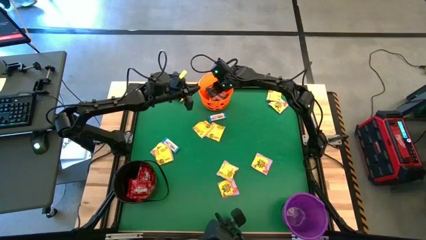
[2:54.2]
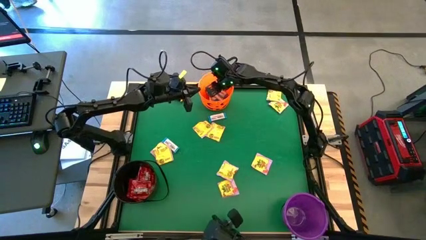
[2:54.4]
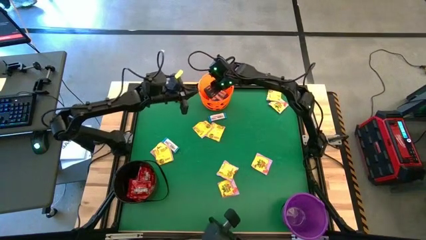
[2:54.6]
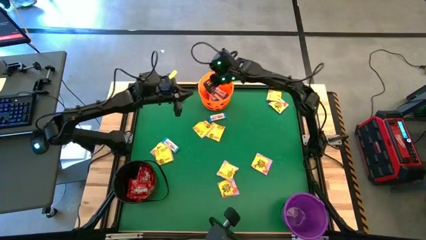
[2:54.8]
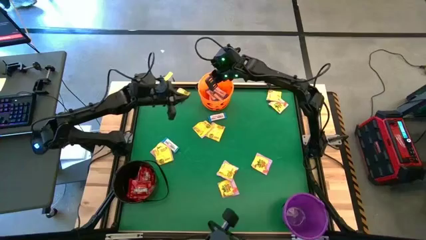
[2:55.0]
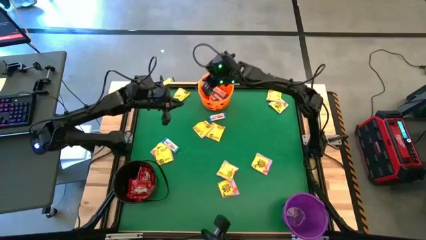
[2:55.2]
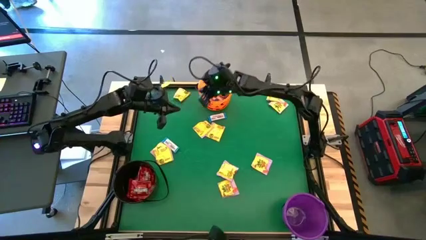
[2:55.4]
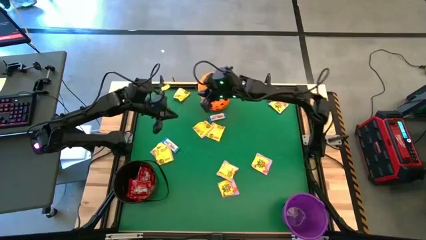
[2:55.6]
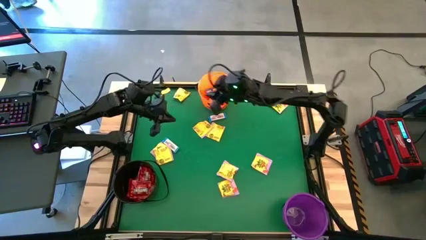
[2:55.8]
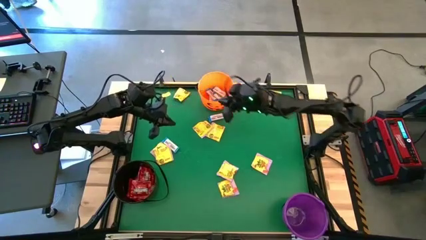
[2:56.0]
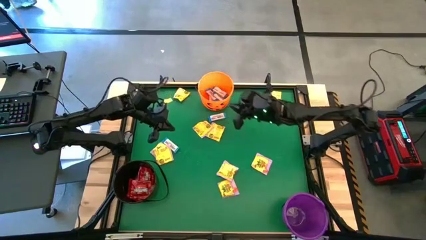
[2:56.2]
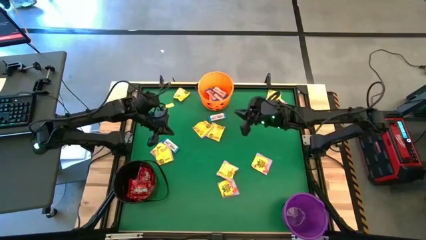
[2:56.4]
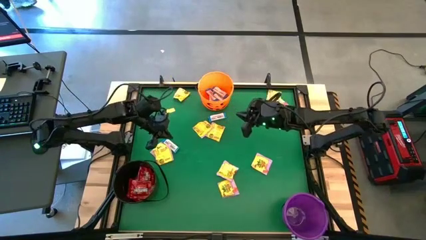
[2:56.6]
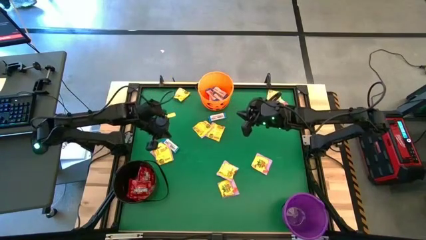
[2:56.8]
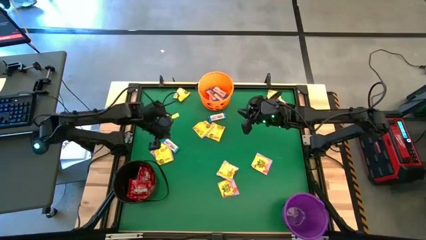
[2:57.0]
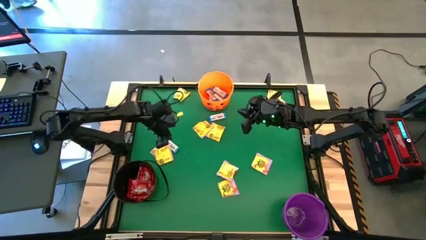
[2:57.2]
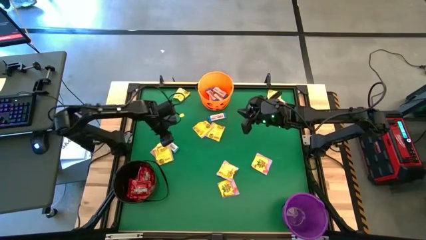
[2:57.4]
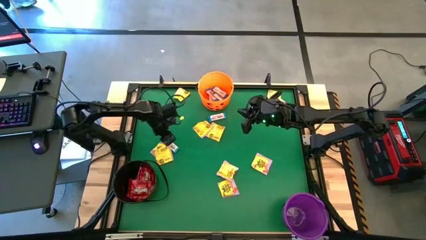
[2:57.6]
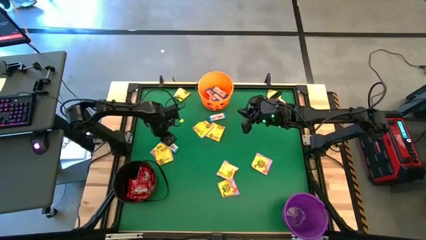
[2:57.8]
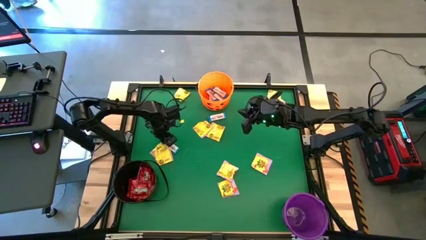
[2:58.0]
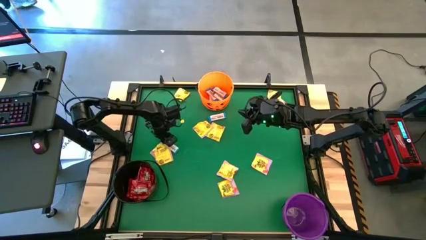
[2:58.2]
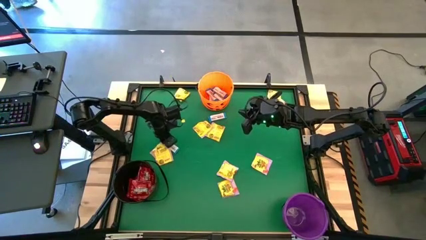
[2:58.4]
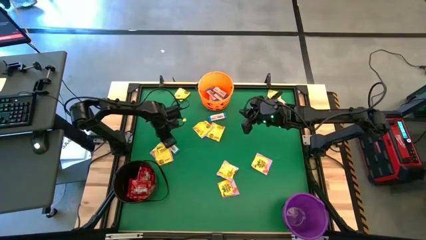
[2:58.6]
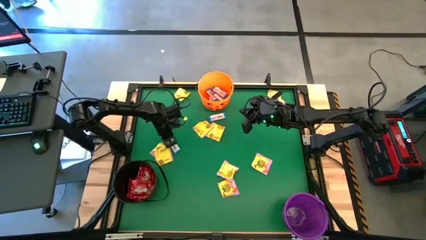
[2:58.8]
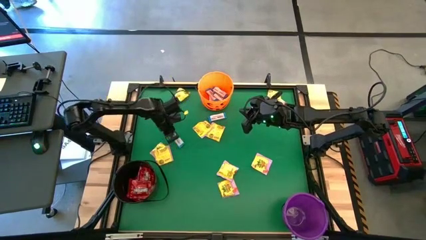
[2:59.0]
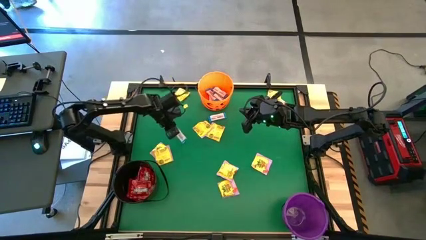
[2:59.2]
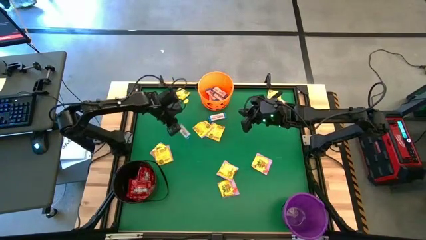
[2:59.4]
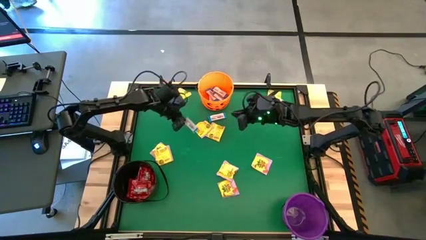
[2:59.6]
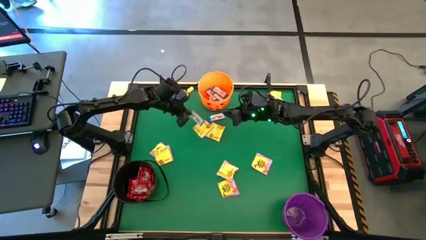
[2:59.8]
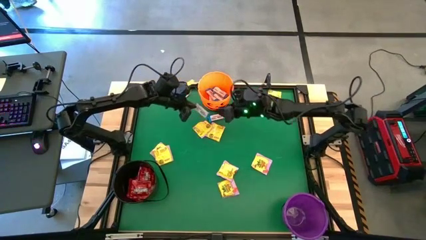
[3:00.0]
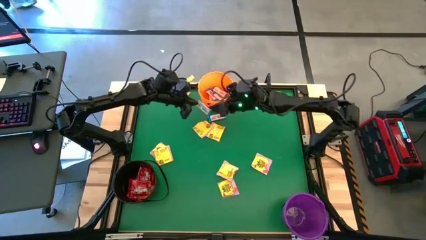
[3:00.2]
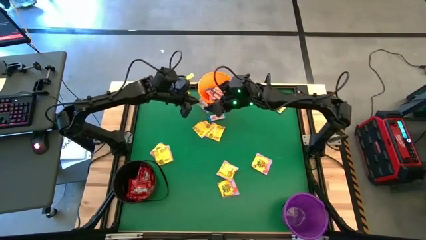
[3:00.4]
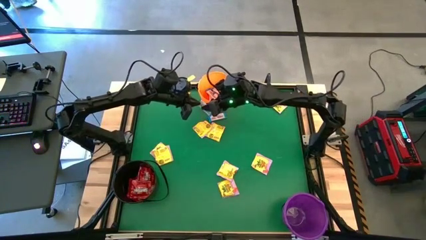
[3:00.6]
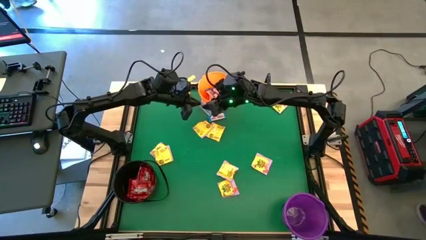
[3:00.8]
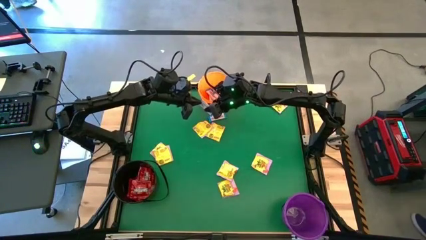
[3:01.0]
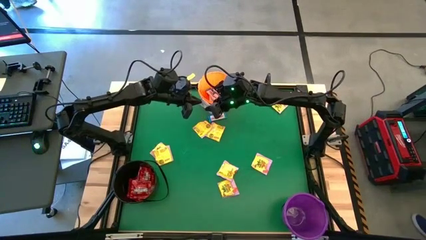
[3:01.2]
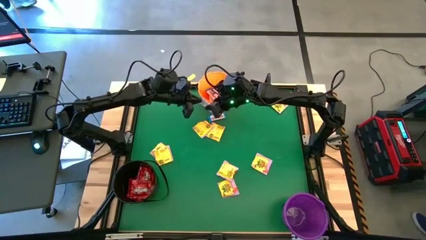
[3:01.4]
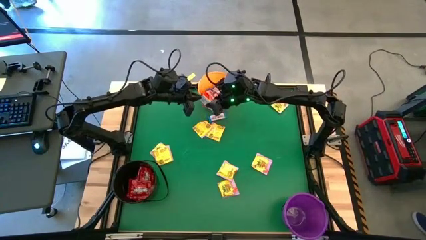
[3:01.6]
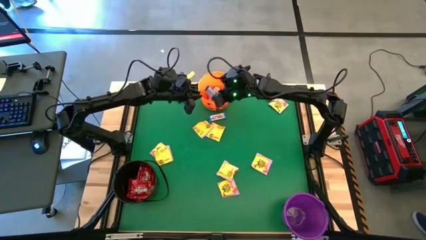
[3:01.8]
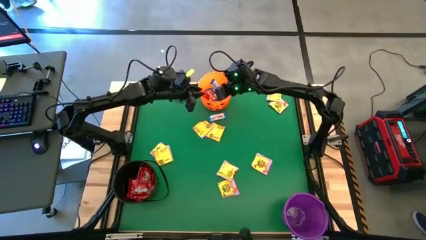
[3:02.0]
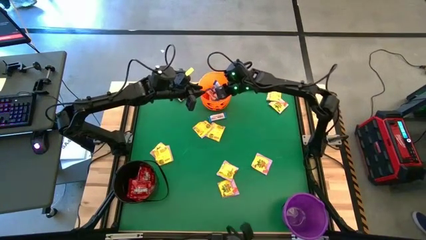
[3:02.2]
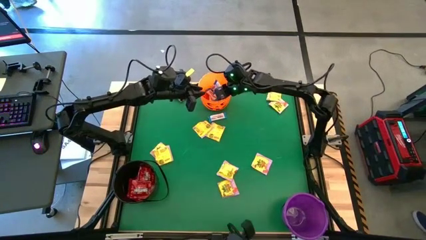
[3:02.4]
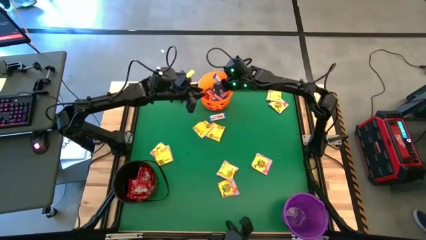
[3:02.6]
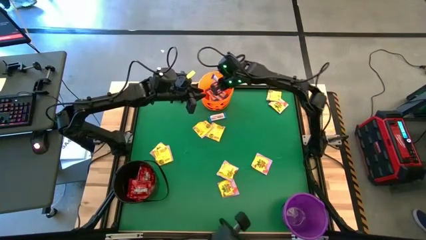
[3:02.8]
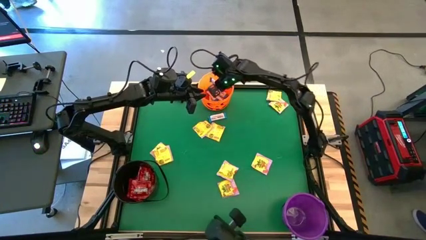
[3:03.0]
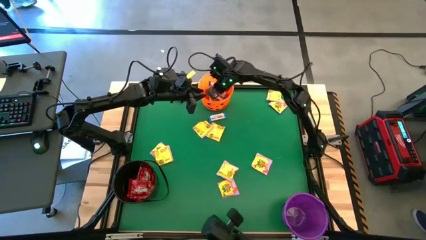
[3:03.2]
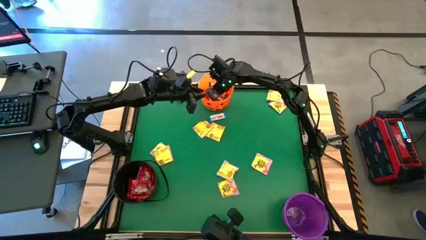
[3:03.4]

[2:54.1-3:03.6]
Task: Sort candy by brand, put in halloween buckets
Put the white chocolate into the orange bucket

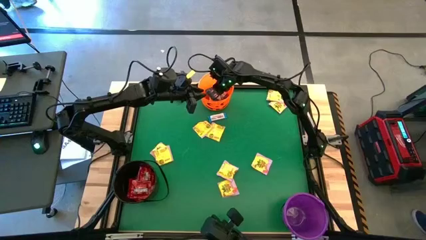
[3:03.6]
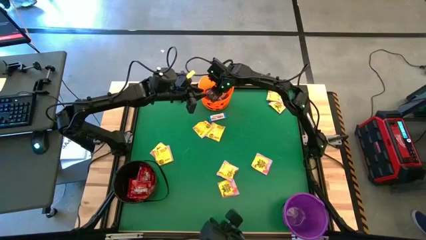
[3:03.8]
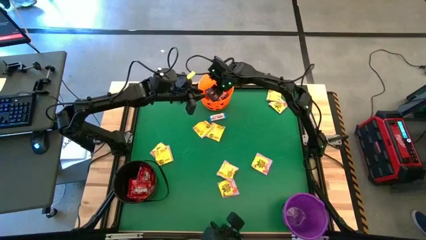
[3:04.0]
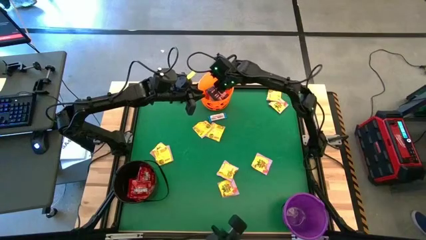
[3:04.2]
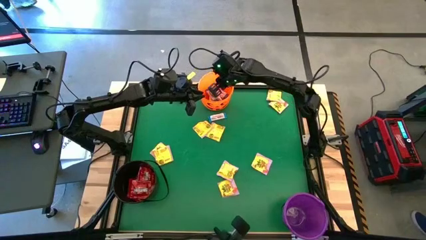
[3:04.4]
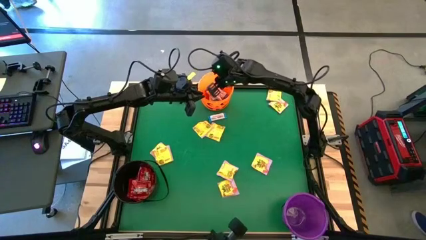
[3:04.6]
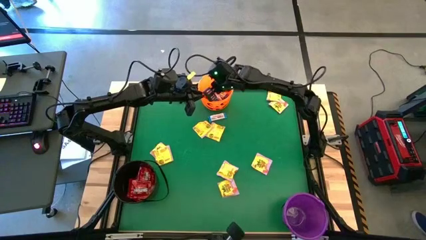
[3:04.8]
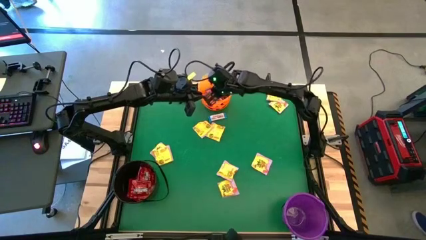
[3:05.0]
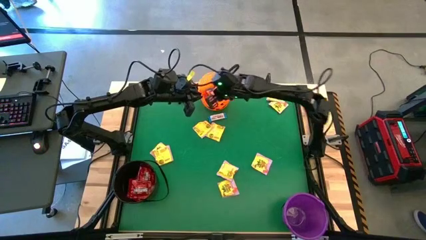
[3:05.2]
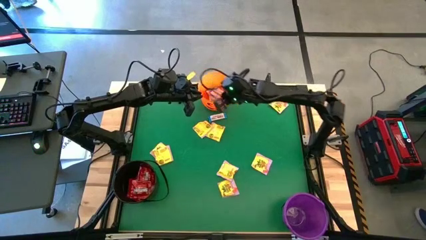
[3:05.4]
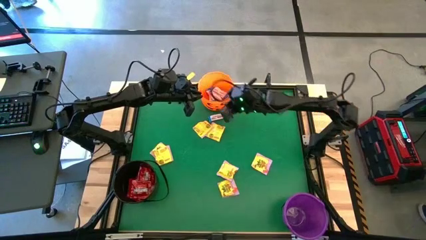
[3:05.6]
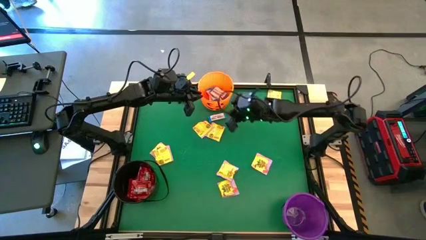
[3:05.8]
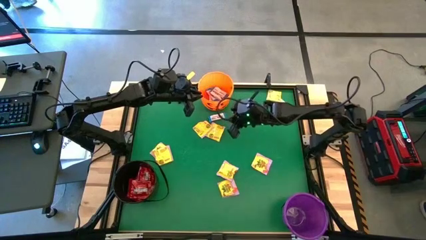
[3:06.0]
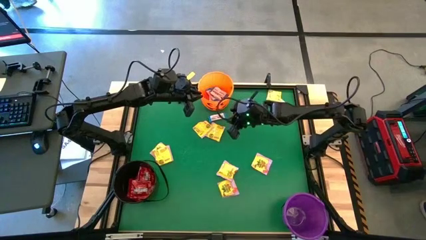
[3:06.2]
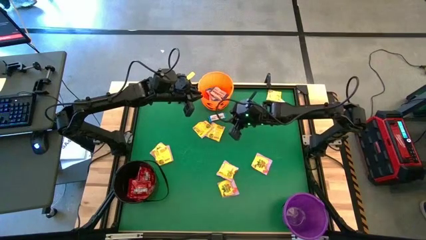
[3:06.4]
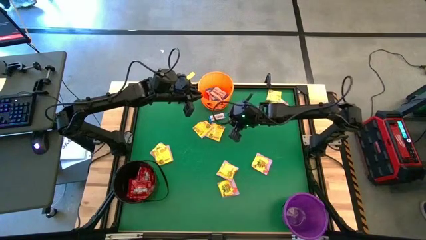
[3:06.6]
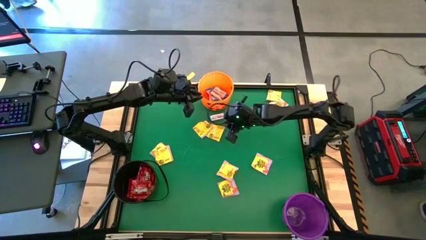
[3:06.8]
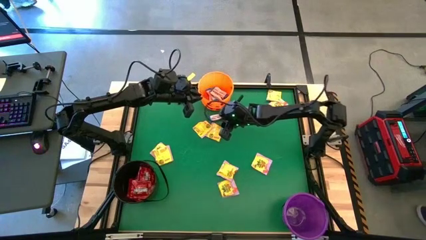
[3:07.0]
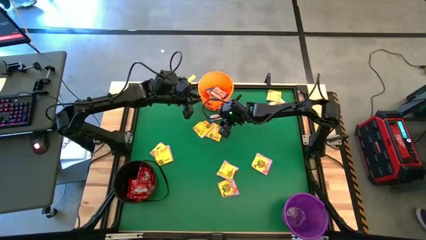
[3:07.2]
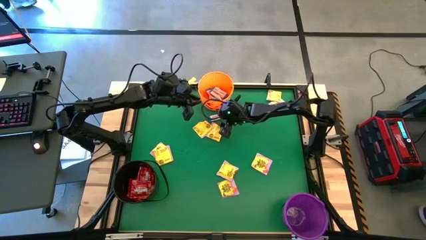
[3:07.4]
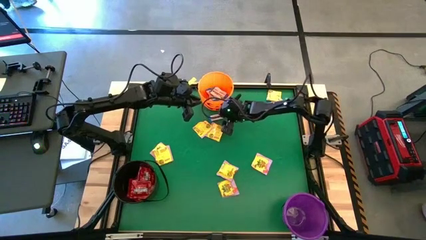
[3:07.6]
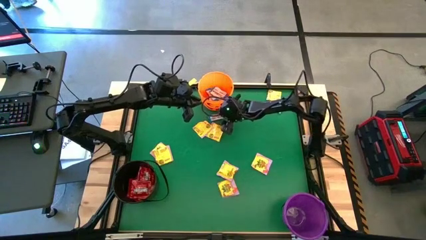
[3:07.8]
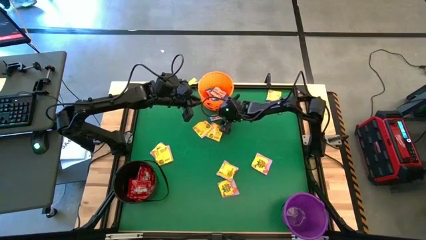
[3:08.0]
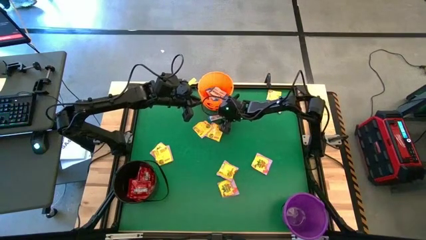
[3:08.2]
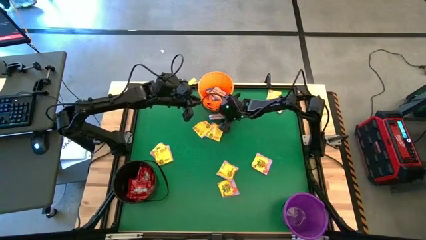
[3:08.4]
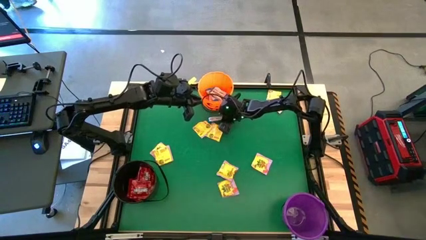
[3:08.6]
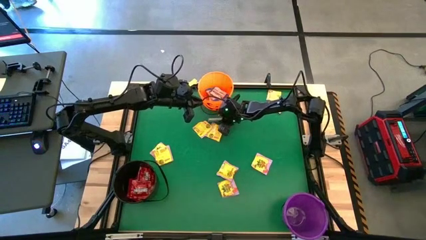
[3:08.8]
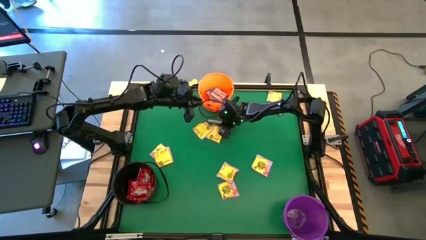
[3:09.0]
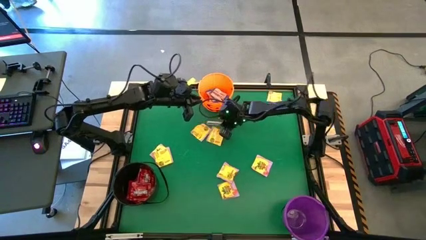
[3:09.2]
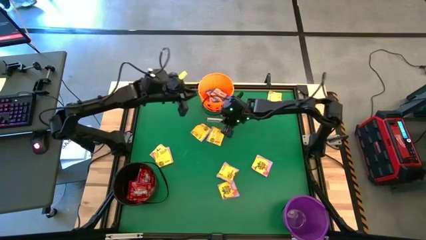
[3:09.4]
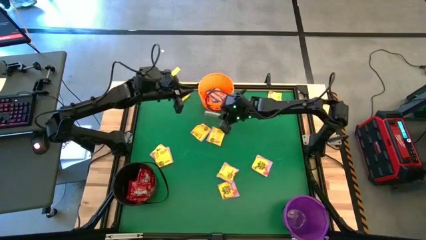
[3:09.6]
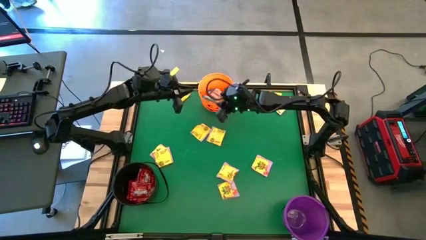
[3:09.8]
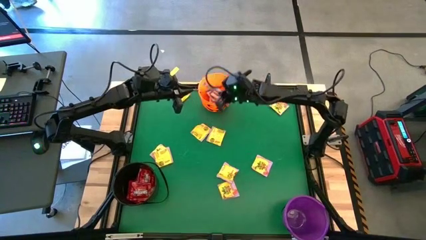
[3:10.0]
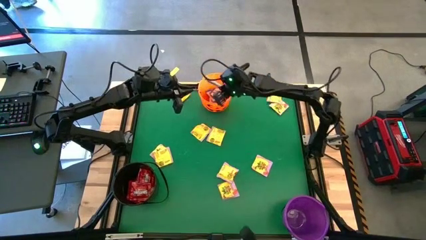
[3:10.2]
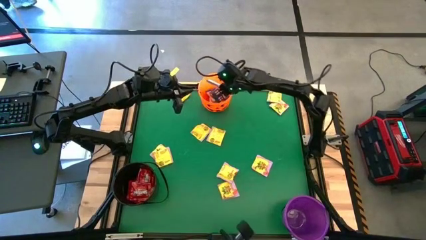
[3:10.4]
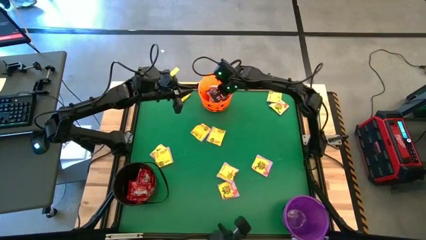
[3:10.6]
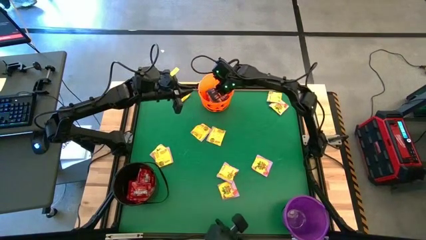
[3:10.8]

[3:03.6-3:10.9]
Put the white chocolate into the orange bucket
